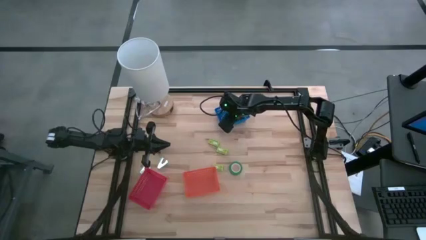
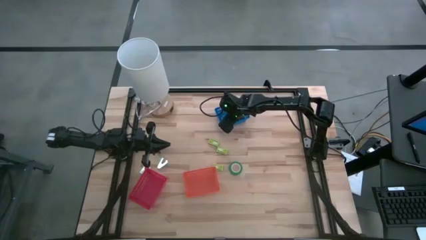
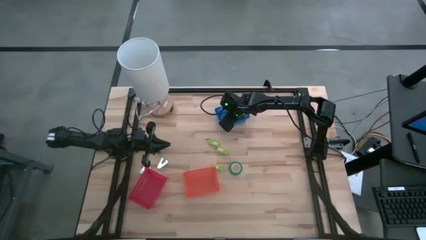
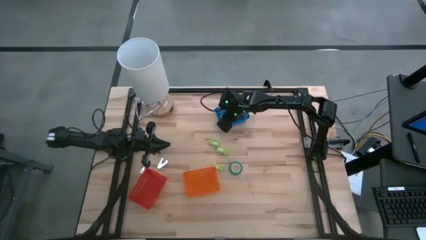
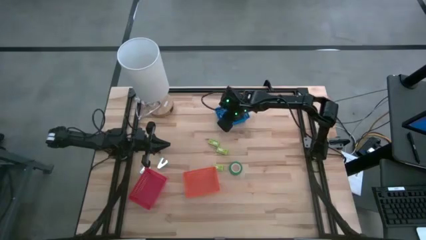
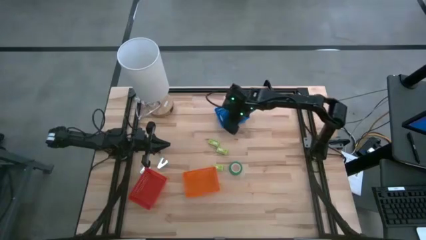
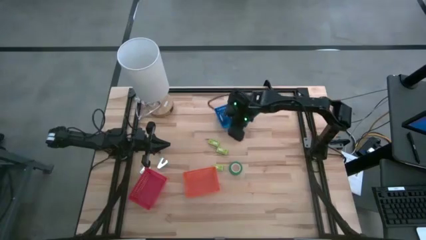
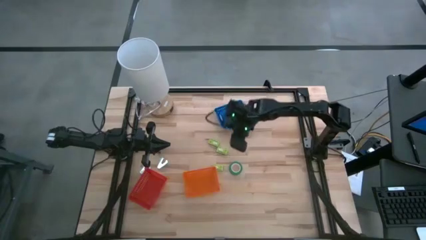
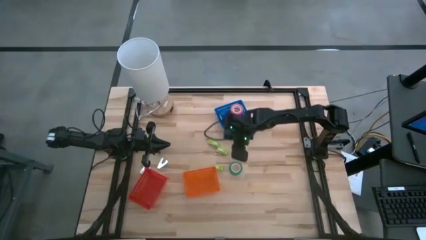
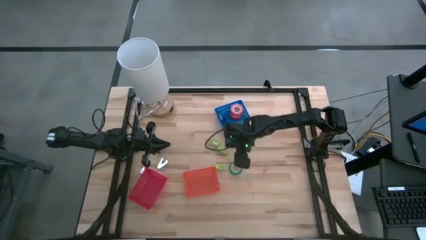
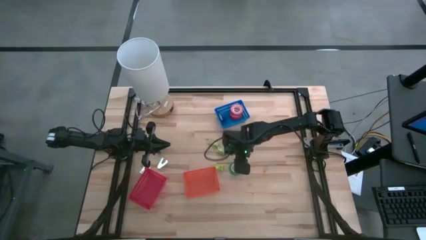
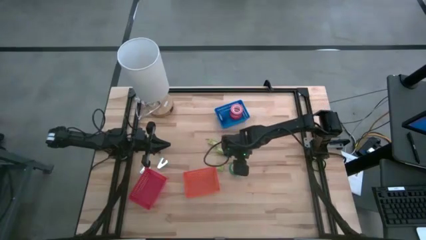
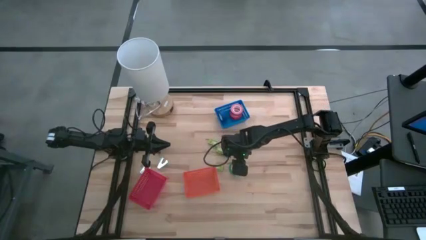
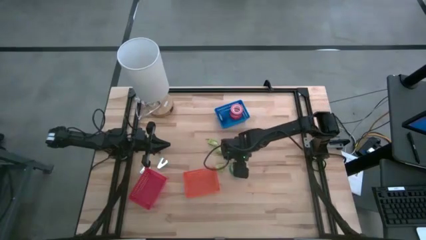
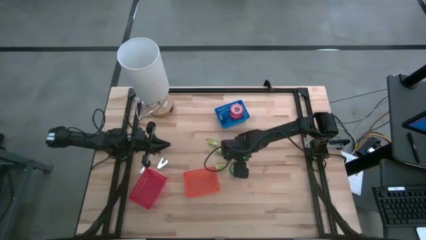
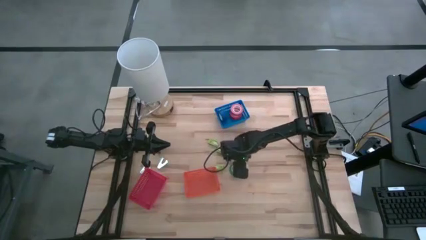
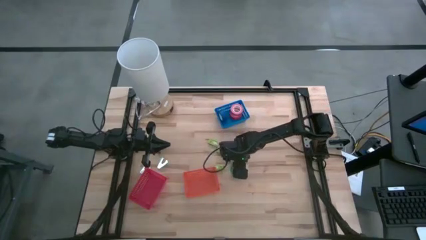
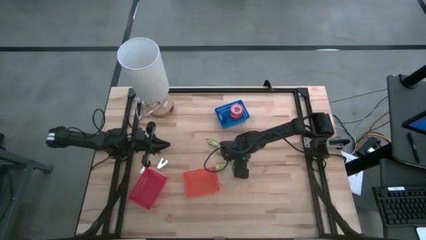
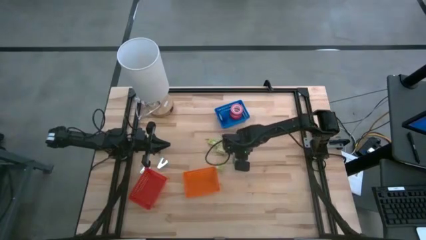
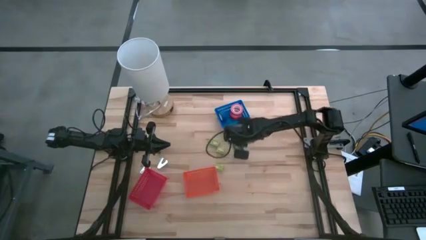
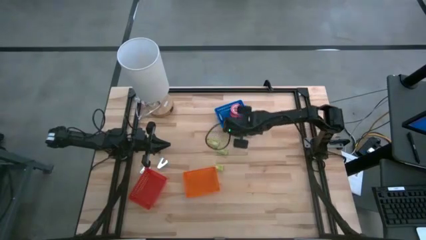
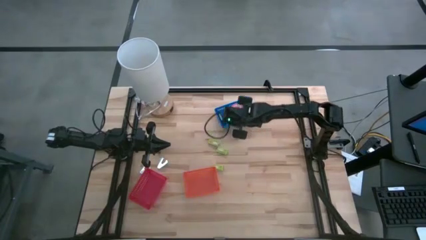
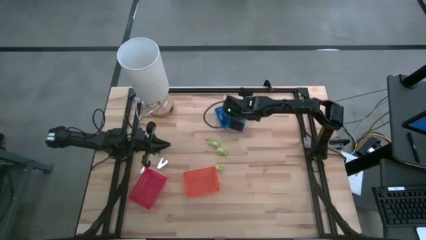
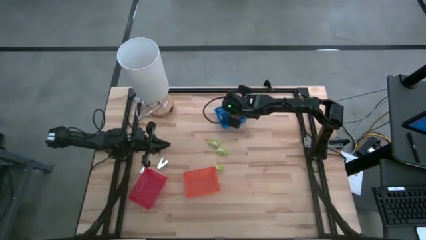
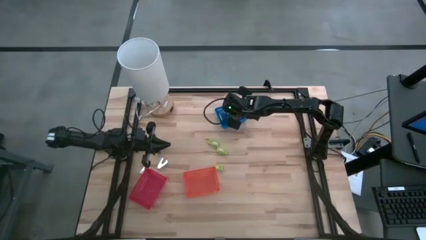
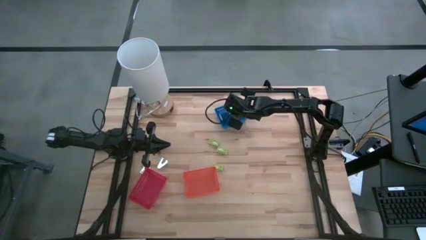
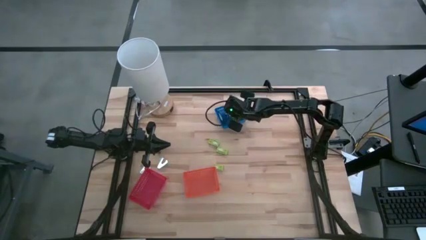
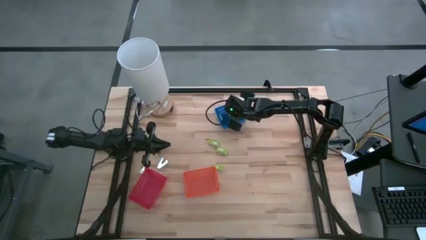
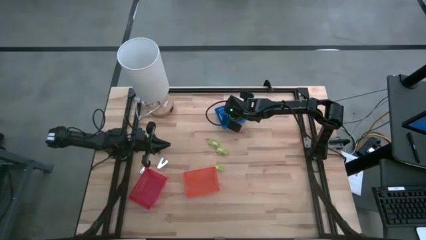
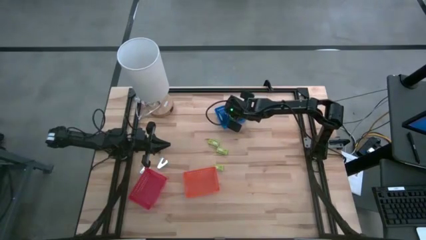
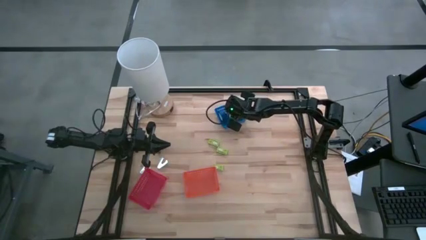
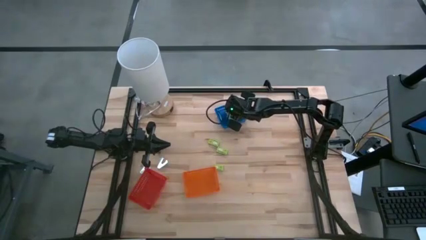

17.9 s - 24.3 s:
Task: Pick and place Stapler, Stapler remover, tape
Put the green tape into the blue bin

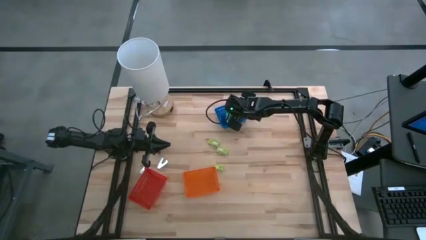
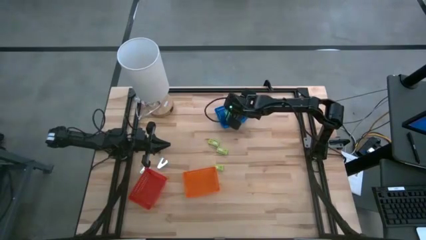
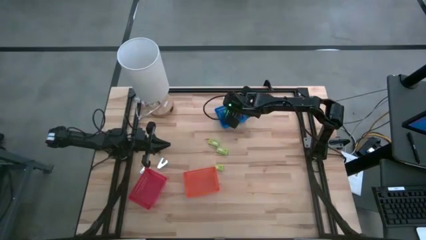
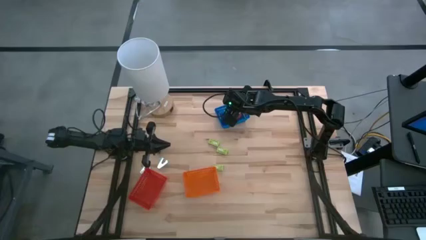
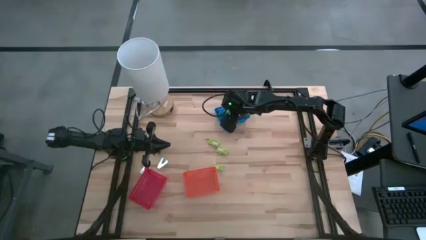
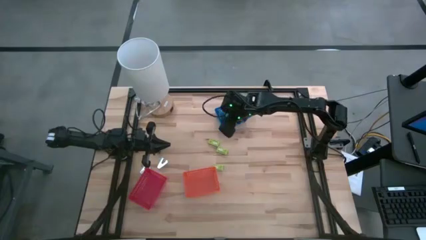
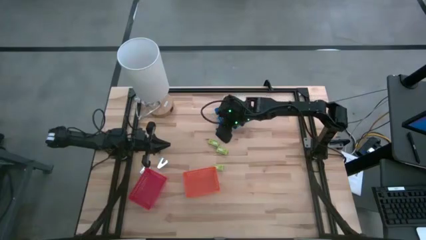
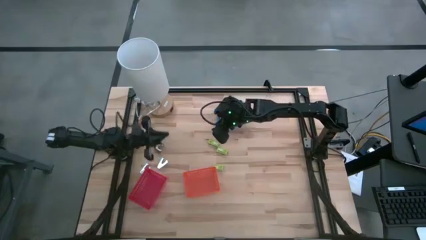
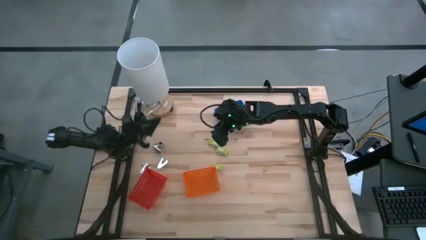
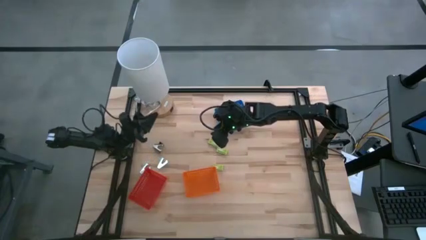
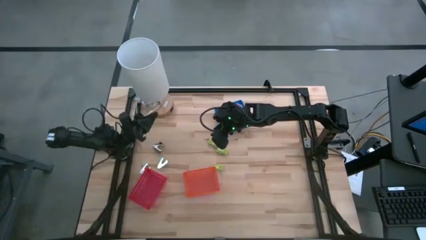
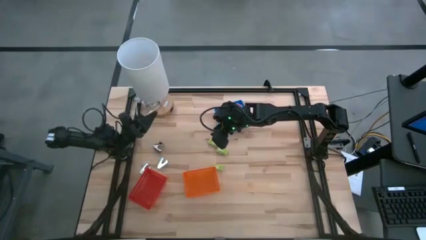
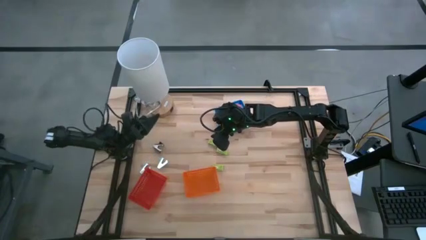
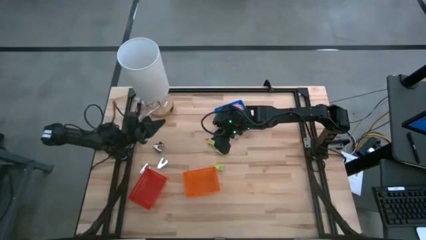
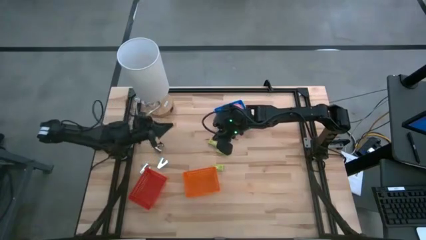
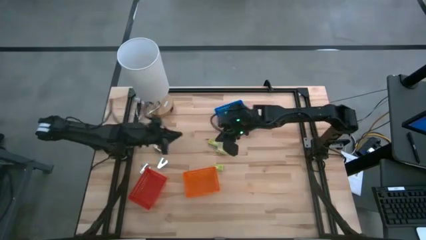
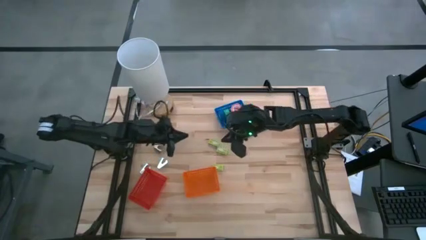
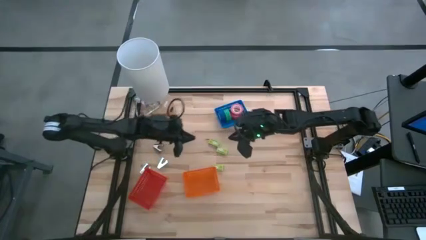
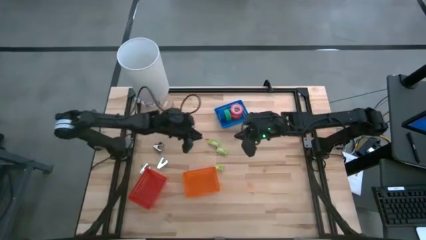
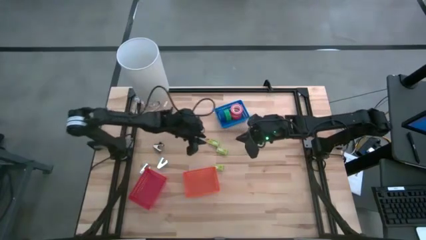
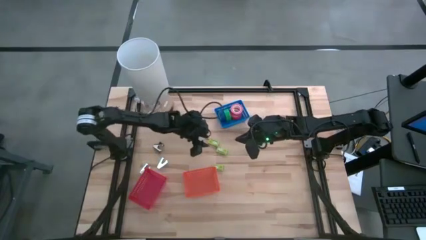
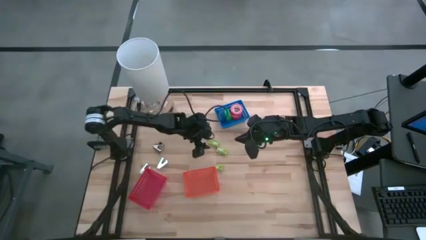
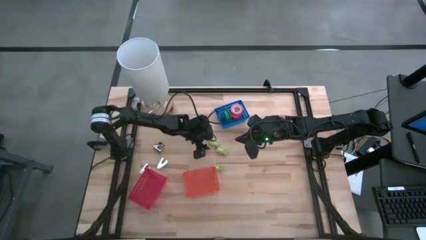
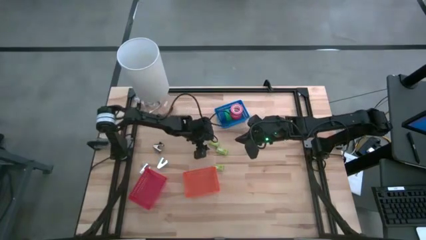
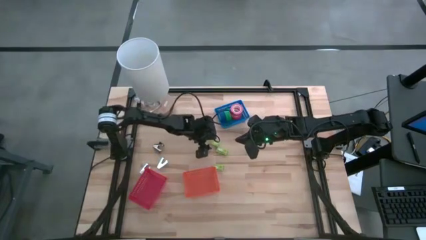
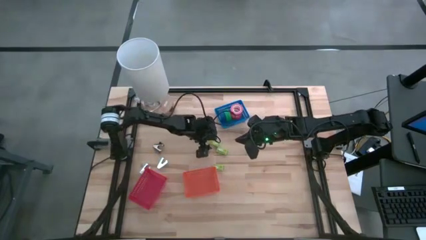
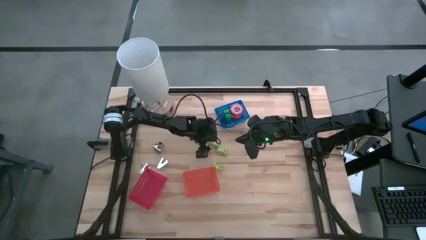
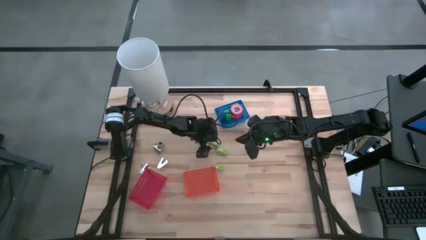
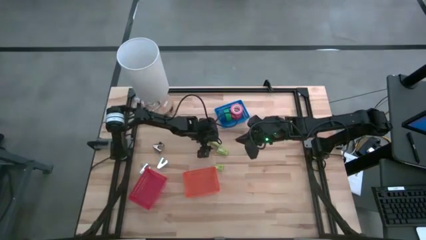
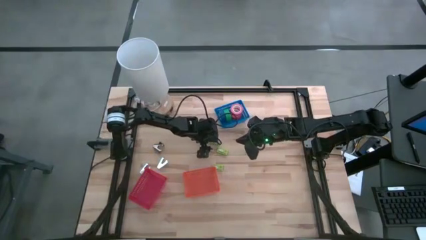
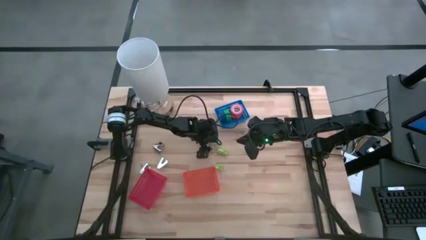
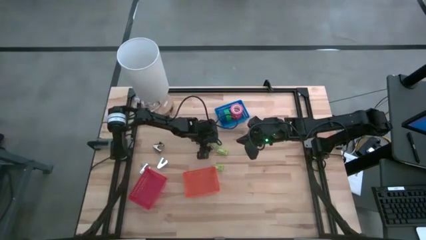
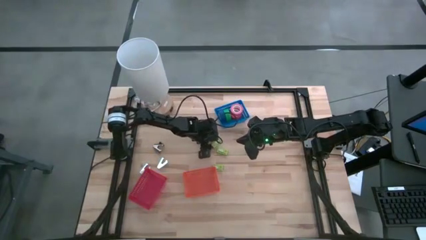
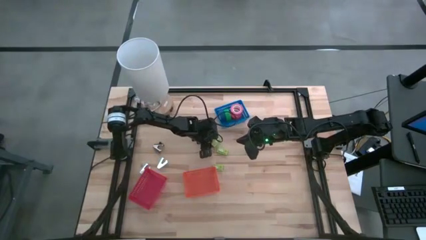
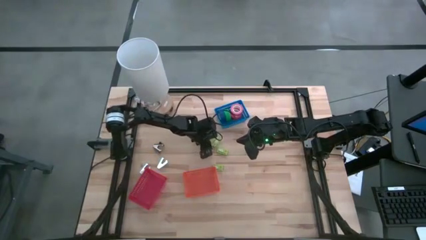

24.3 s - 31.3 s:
Put the top green box of staples into the orange bin

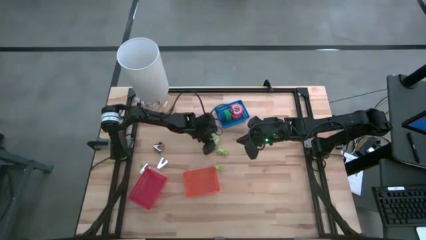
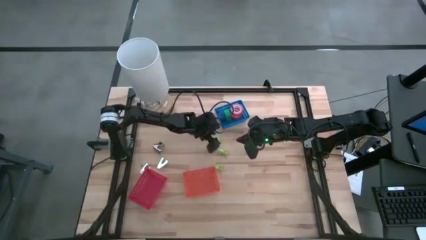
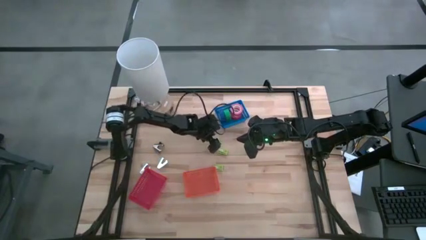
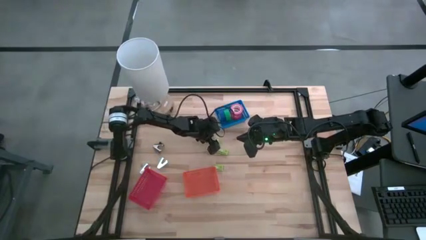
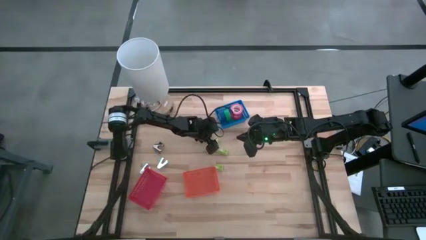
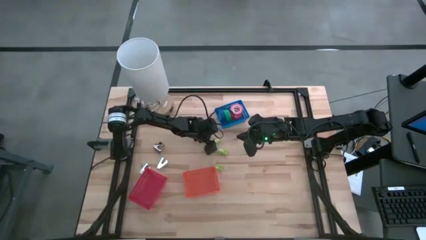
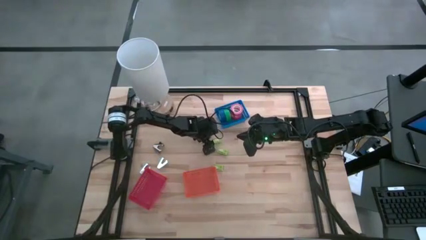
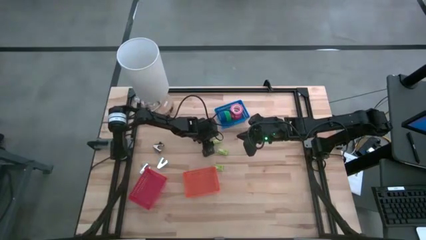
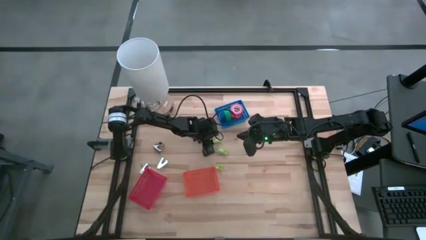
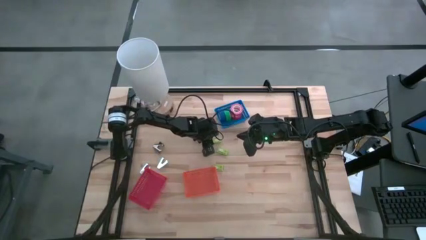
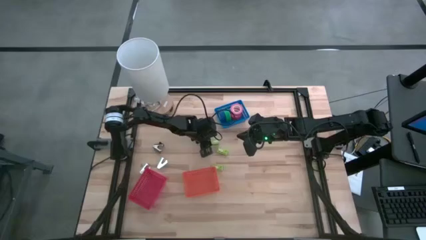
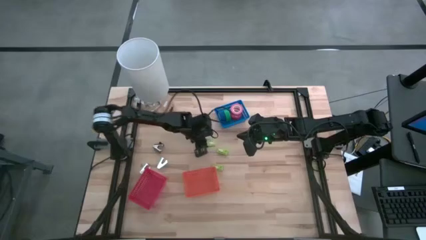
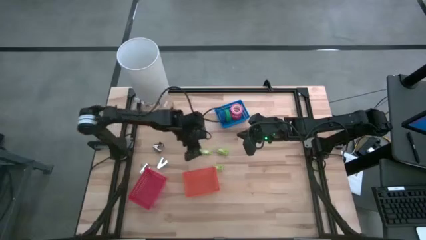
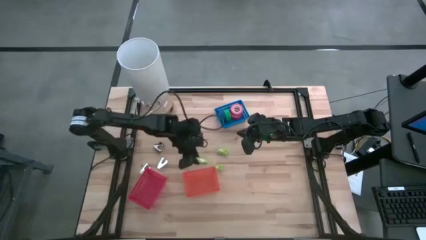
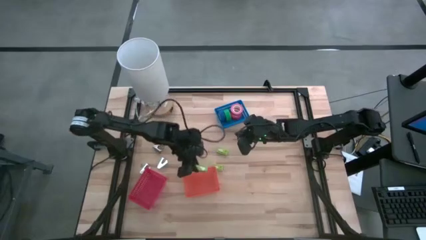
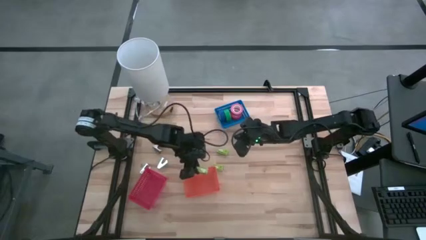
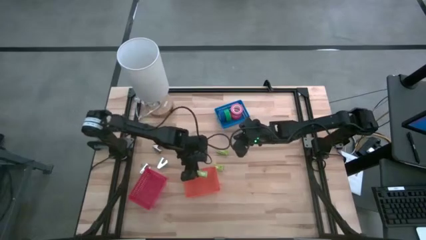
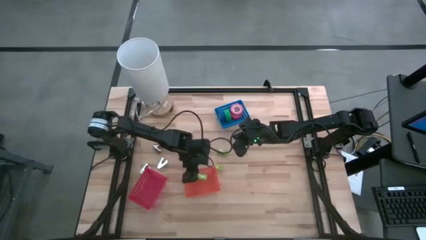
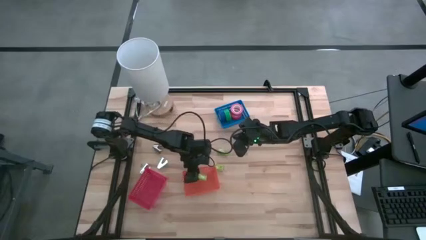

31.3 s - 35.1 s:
Put the top green box of staples into the orange bin

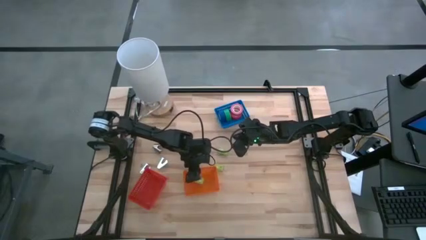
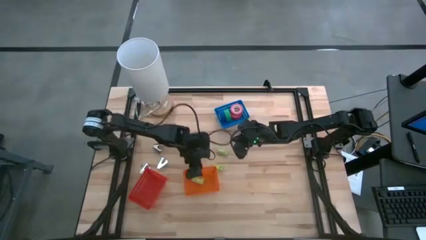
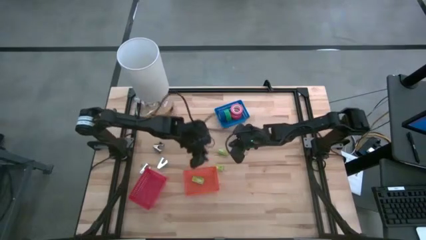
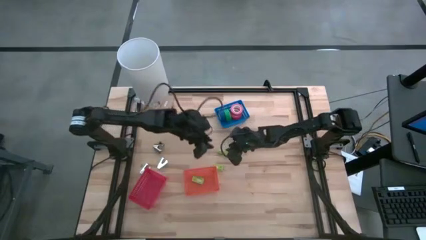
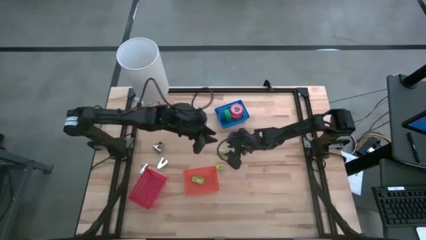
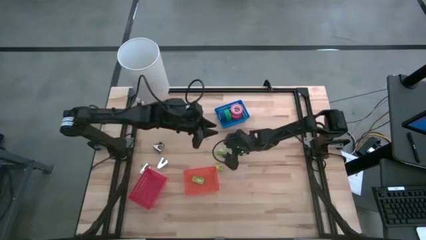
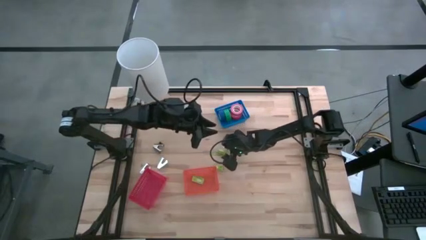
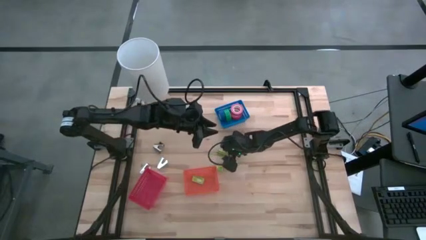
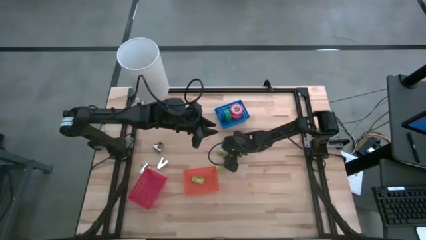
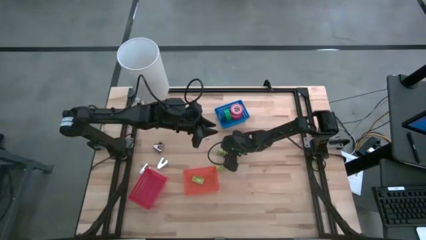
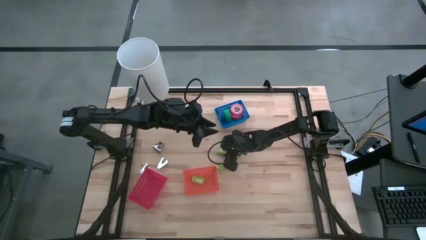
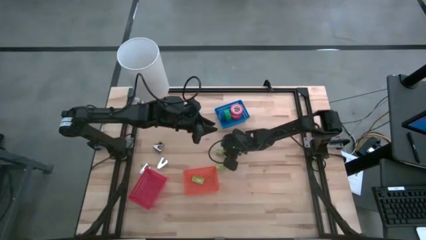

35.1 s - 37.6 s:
Put the top green box of staples into the orange bin
